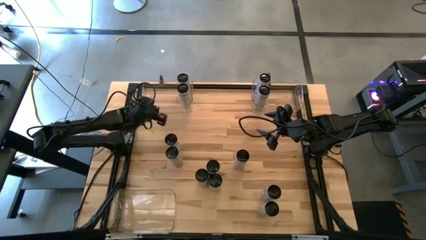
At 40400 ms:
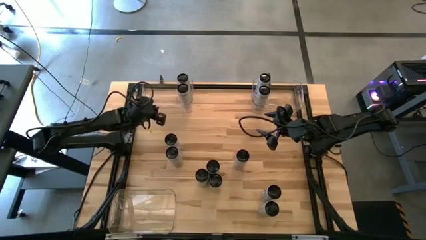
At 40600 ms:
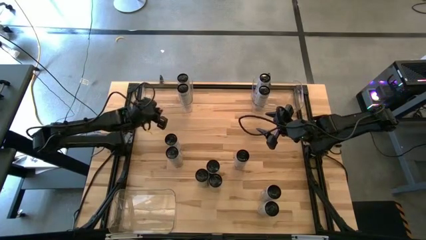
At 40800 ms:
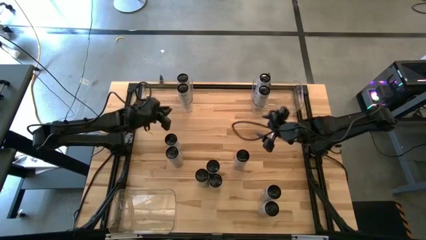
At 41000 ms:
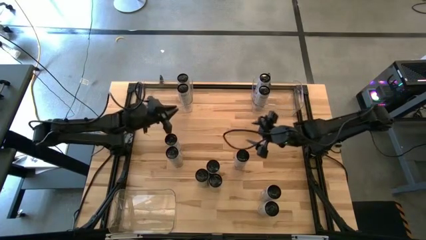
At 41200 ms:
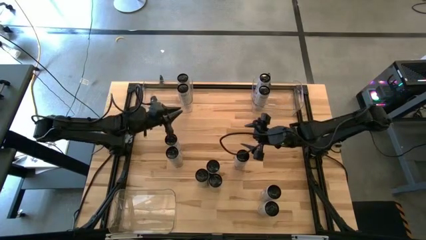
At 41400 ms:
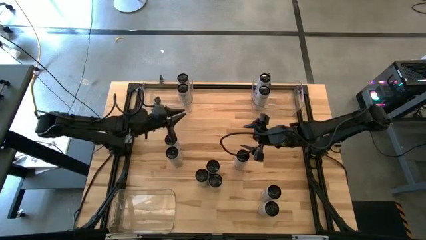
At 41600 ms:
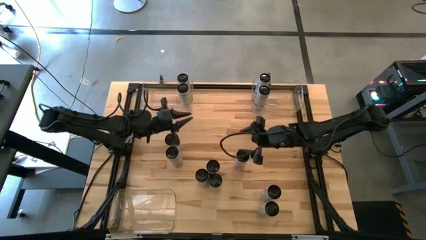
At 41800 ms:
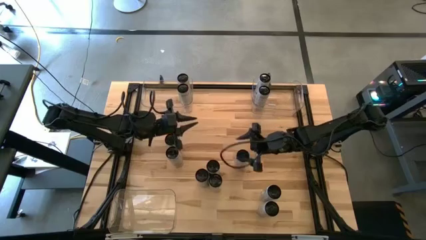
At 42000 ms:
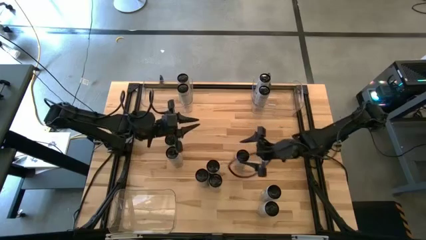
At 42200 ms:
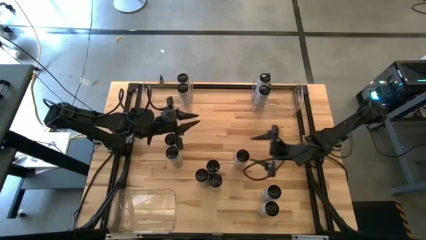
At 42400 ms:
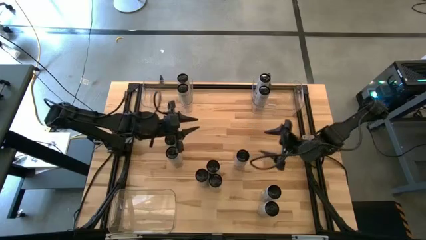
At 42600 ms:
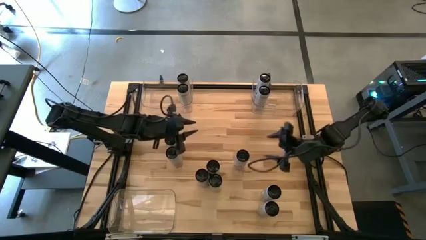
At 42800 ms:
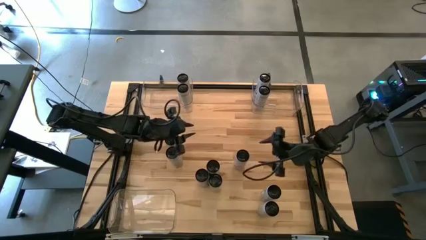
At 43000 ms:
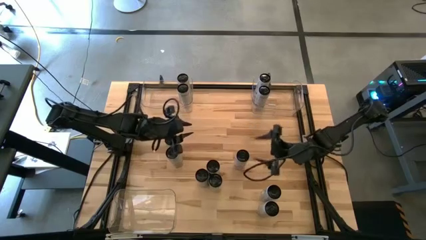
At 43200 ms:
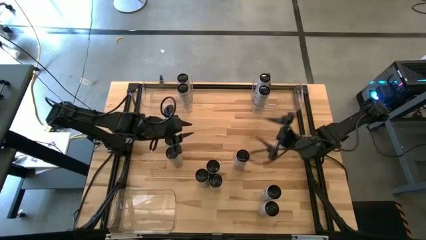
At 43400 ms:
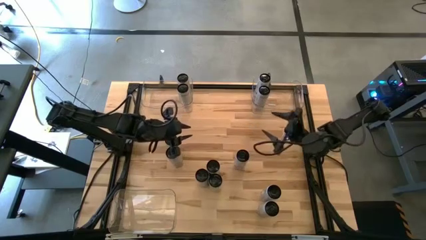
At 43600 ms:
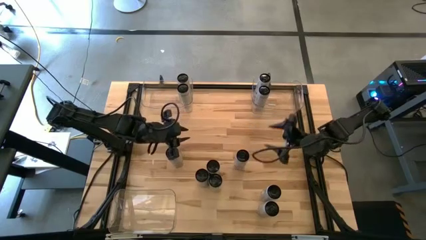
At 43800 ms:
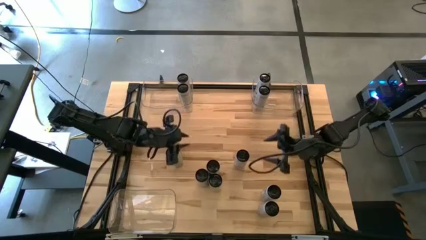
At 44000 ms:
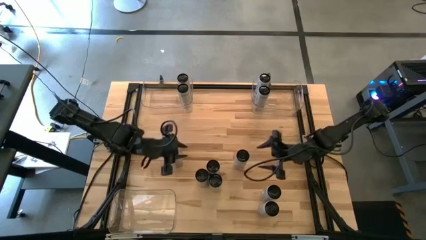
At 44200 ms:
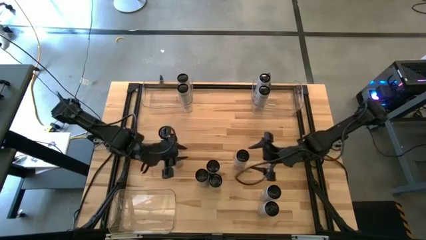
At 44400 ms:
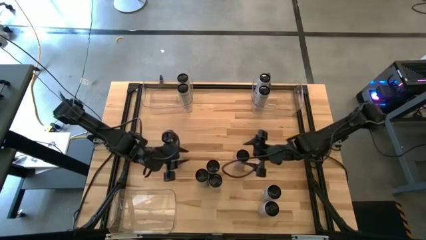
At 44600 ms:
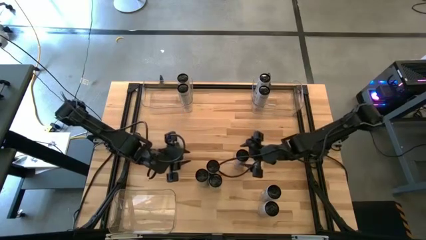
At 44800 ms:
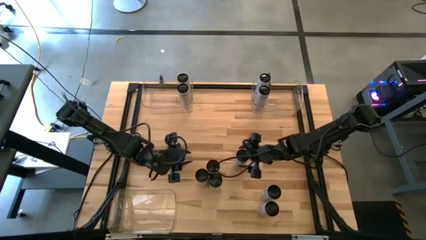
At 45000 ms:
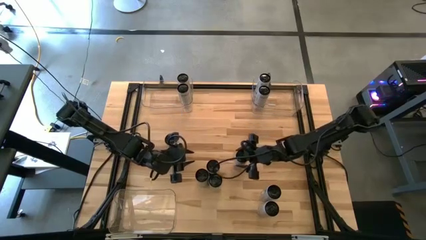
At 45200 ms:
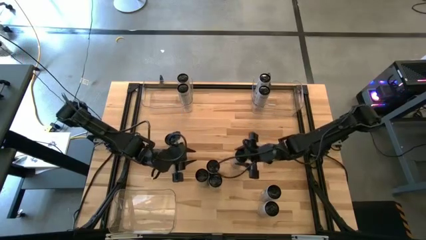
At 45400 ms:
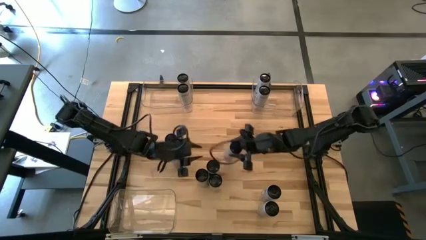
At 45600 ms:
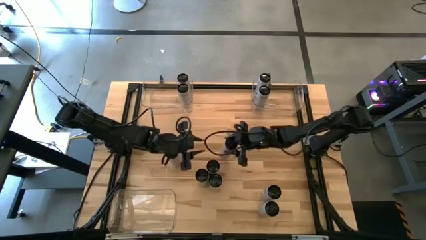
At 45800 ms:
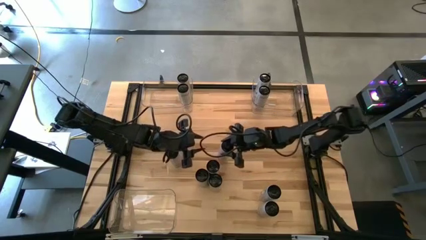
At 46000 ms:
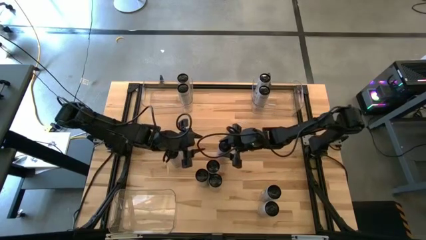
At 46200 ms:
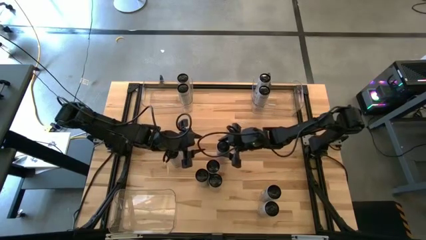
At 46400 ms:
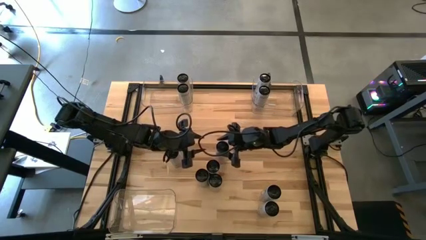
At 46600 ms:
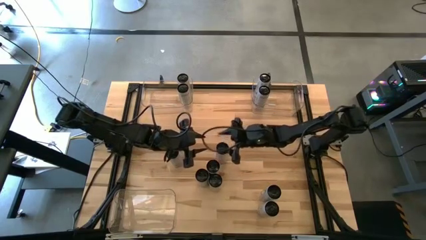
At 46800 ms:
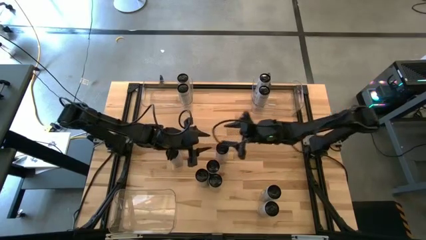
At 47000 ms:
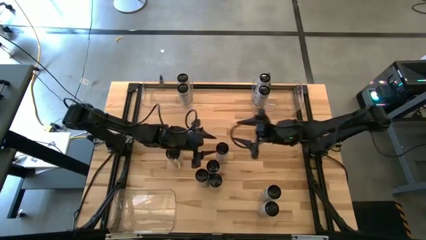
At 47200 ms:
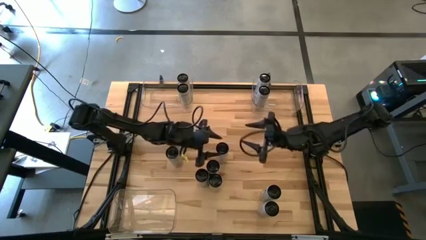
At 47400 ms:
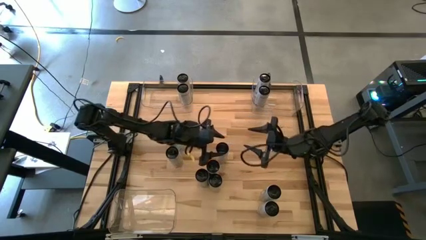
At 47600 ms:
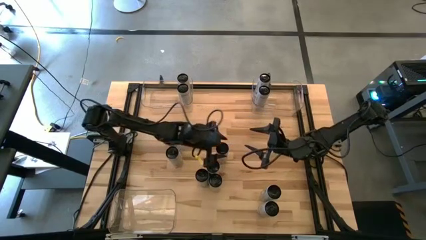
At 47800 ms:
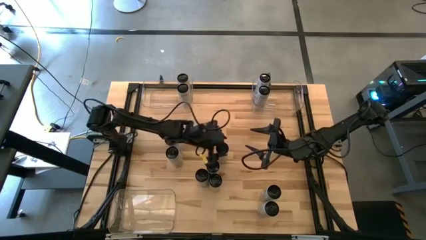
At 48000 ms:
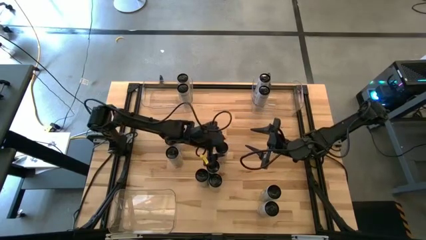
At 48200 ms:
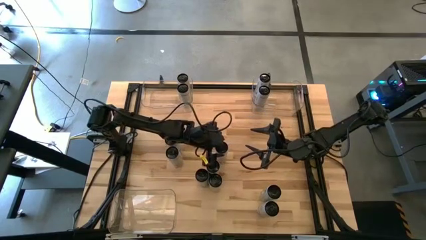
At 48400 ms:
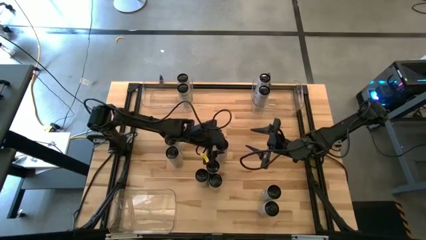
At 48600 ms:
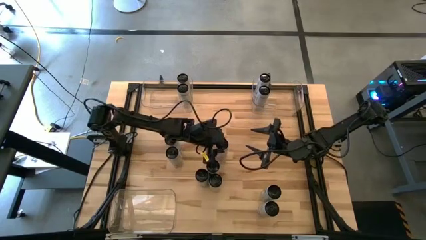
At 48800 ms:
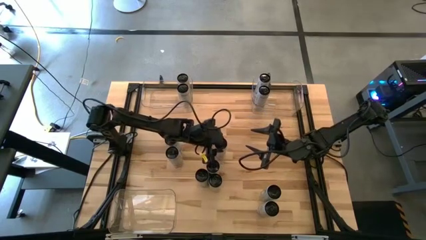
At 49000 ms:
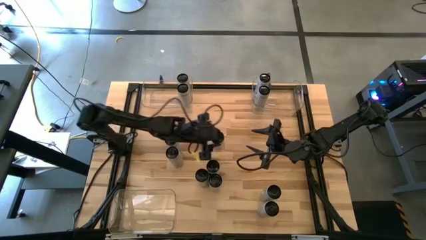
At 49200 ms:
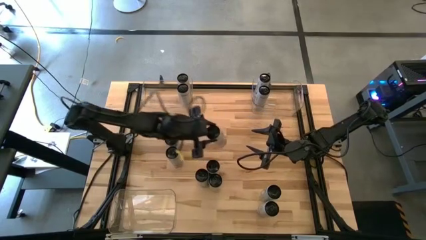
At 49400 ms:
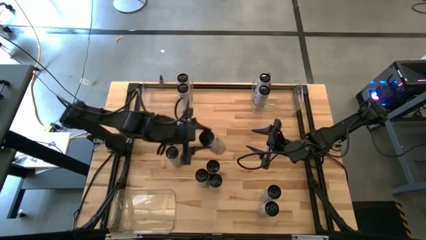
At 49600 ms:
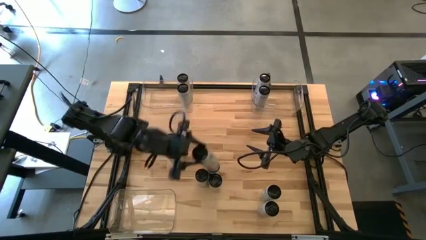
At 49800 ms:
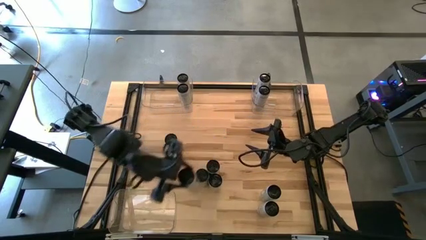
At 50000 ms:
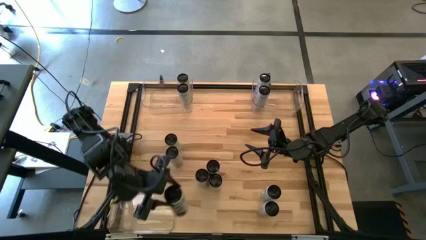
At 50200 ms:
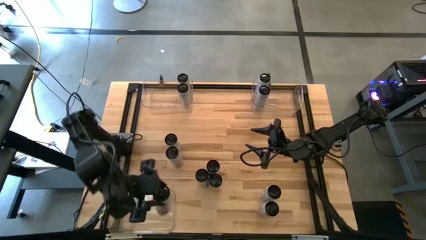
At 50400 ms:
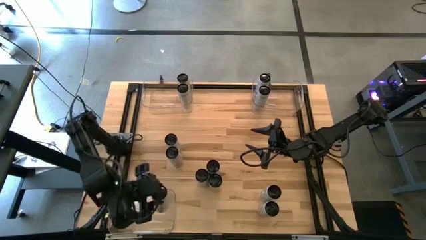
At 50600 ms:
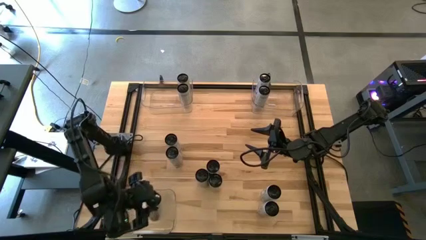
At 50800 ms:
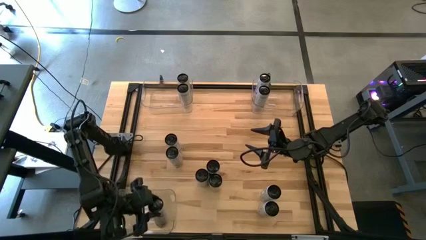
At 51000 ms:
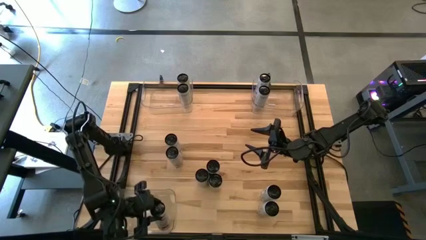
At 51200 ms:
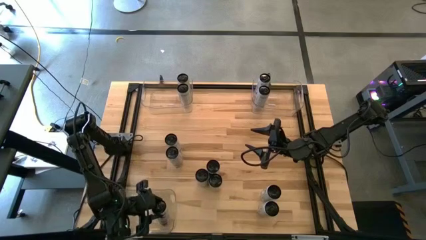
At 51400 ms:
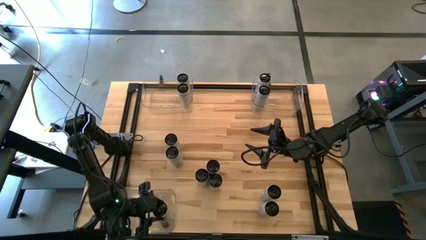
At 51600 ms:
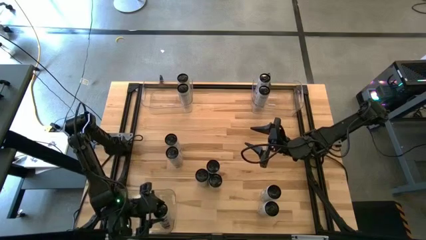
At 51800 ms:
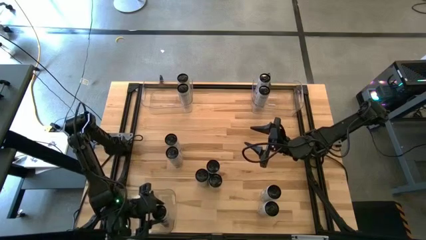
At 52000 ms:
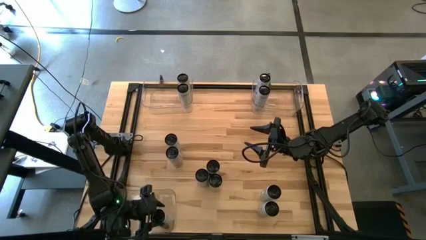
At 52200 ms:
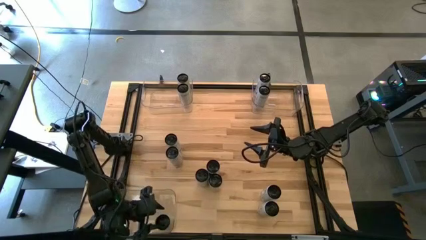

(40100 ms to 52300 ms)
Task: Sort soda cans
Put the white-pink soda can into the bottom left transparent bin

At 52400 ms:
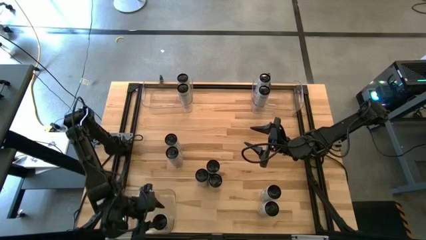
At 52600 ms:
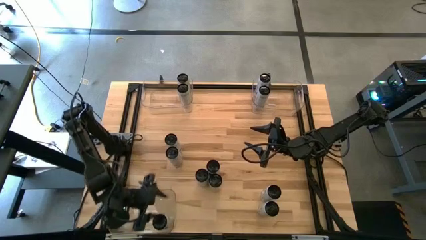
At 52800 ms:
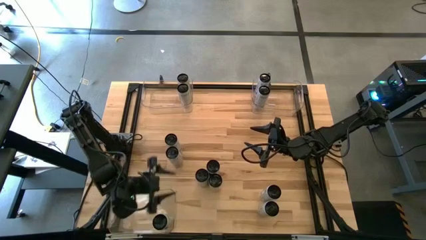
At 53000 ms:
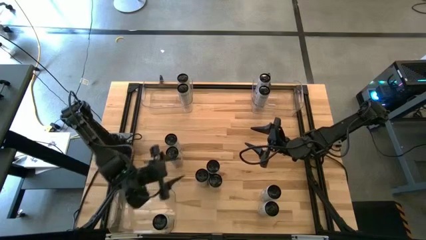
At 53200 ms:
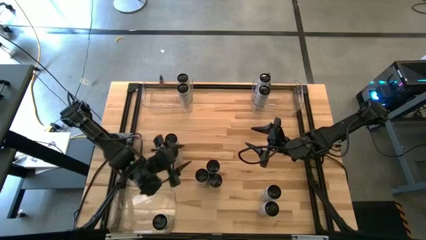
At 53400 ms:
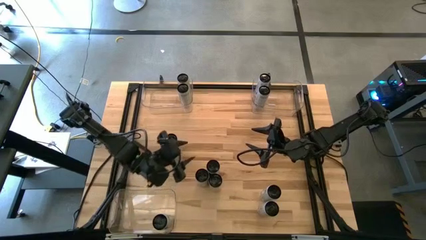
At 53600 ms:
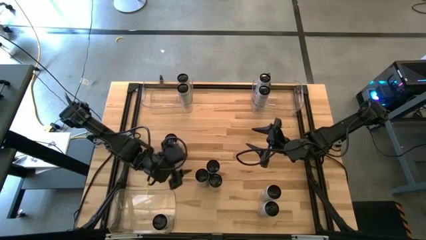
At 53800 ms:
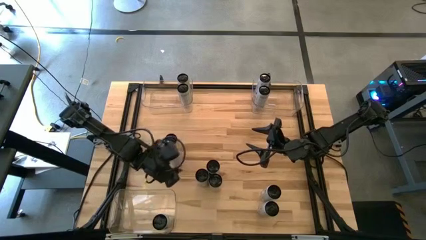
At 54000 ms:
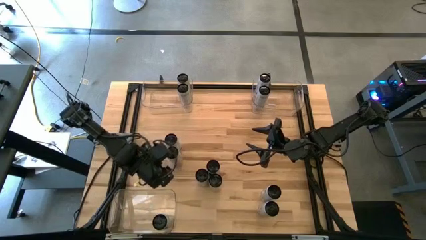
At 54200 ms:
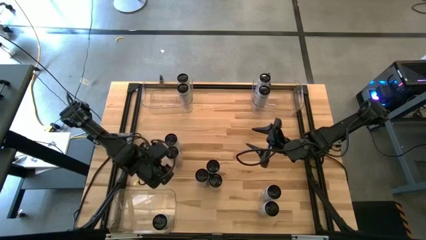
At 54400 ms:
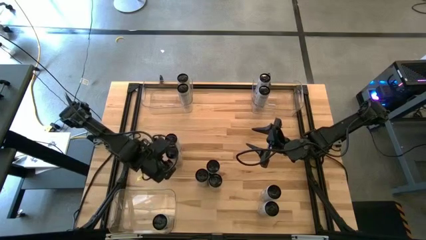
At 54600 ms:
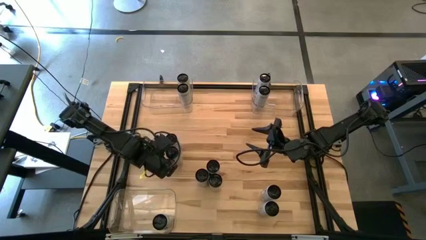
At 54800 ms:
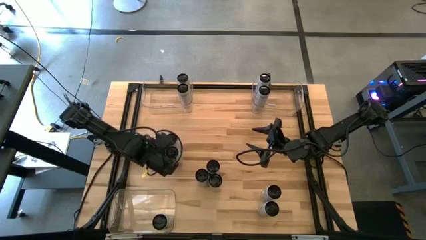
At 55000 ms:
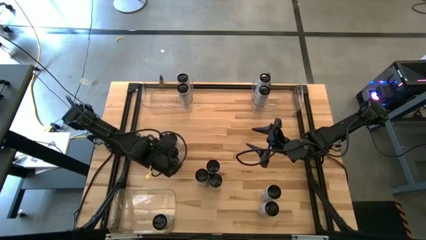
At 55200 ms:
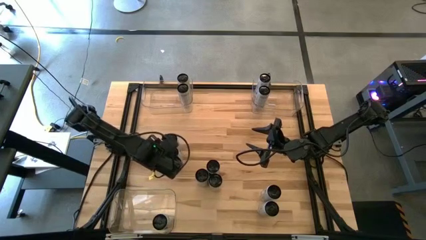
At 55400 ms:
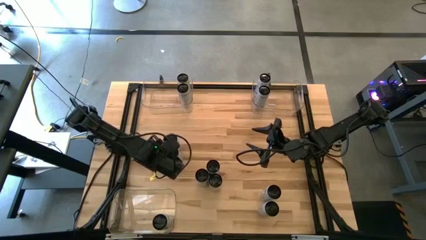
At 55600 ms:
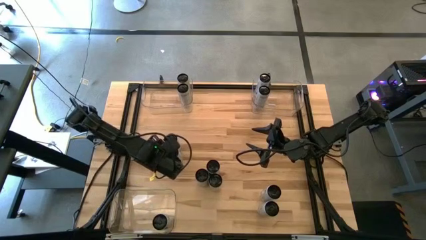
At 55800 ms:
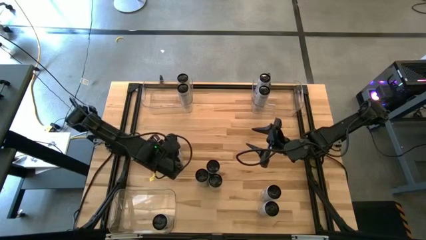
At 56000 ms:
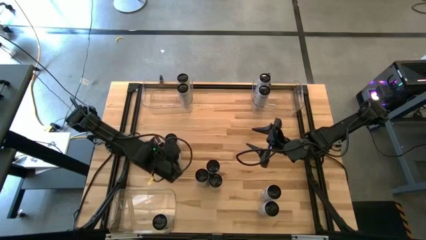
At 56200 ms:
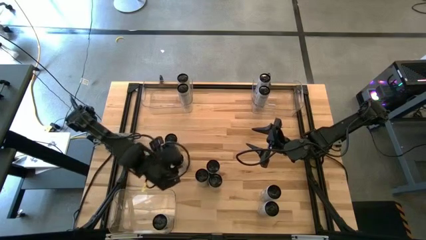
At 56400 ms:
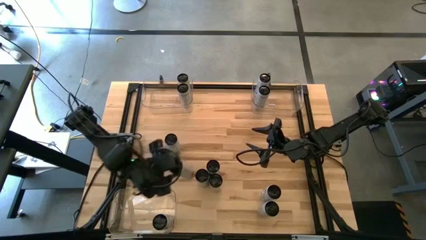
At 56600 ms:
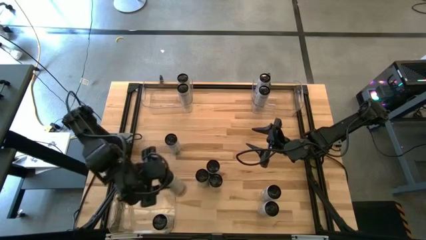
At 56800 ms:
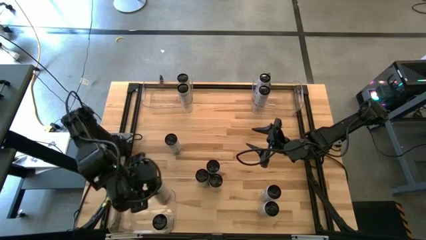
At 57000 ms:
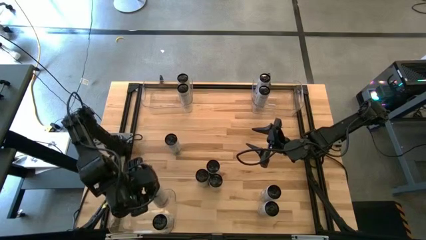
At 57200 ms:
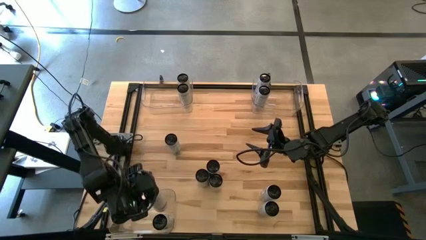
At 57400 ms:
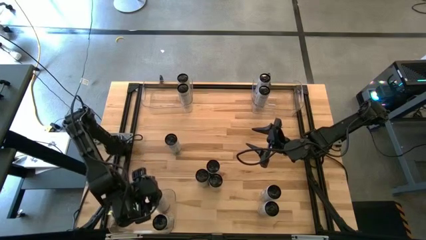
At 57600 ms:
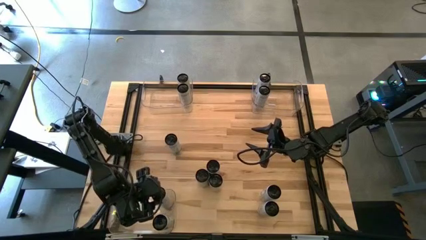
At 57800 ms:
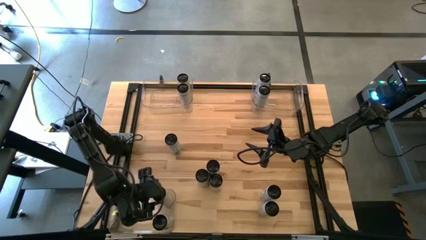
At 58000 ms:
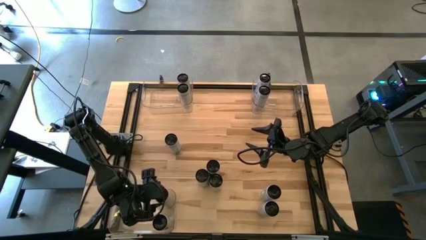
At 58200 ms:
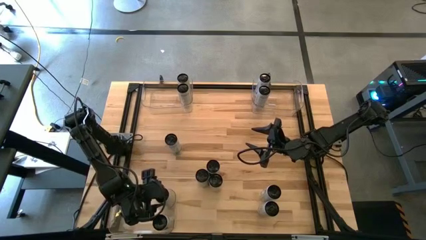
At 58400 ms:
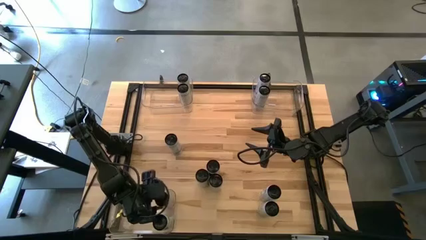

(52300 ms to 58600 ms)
Put the white-pink soda can into the bottom left transparent bin
